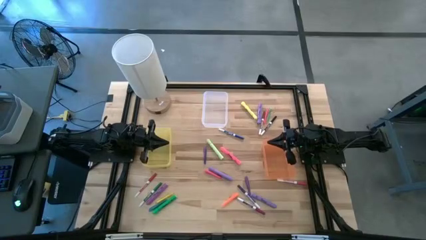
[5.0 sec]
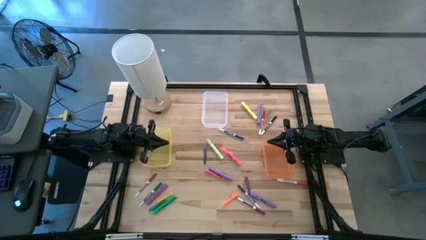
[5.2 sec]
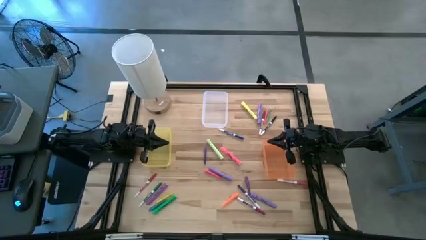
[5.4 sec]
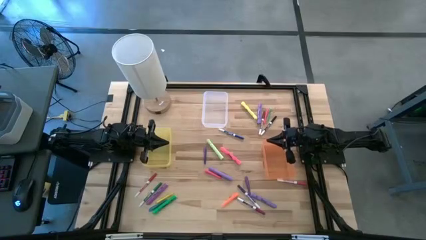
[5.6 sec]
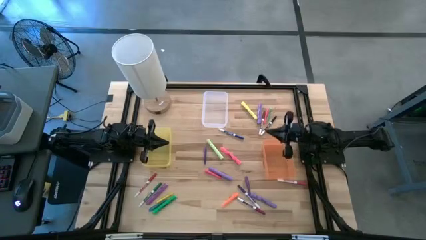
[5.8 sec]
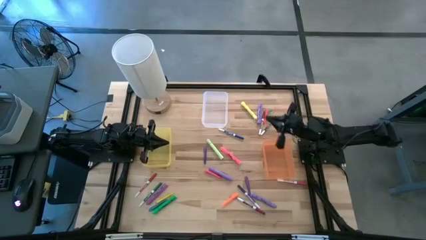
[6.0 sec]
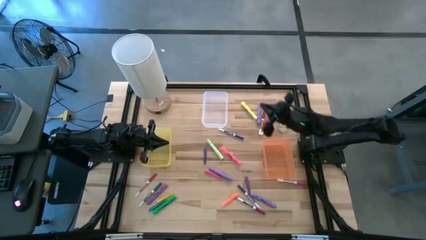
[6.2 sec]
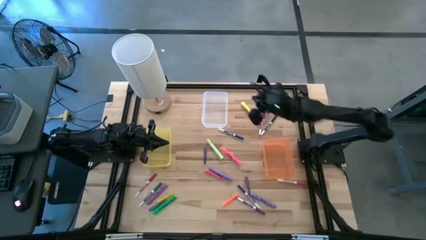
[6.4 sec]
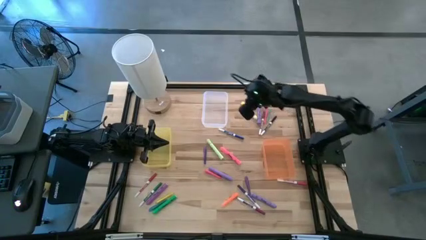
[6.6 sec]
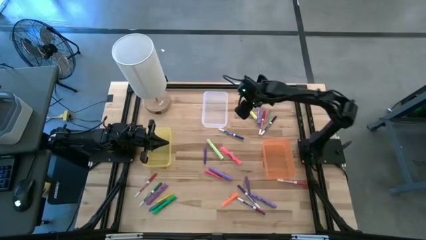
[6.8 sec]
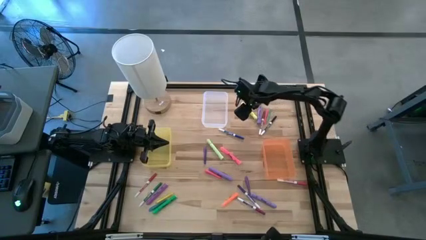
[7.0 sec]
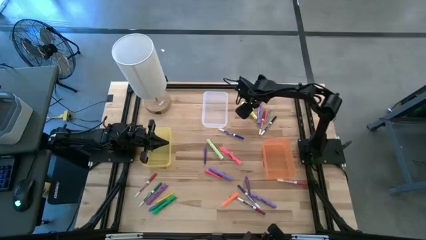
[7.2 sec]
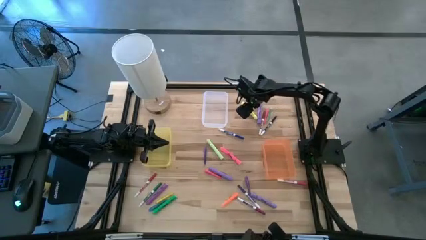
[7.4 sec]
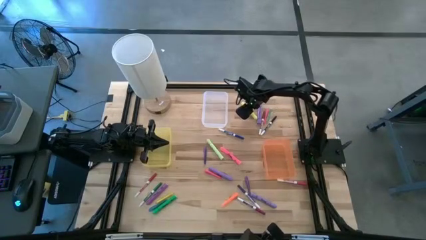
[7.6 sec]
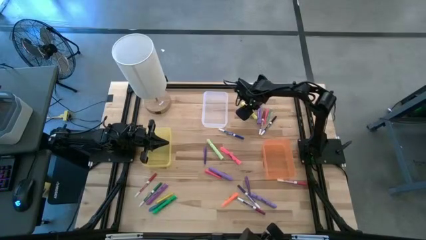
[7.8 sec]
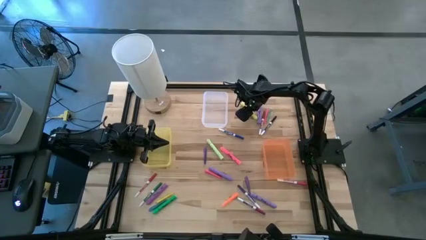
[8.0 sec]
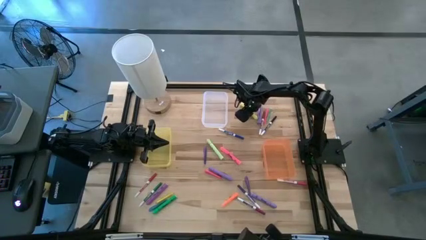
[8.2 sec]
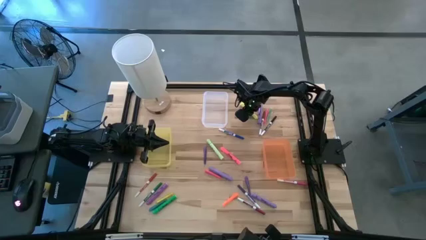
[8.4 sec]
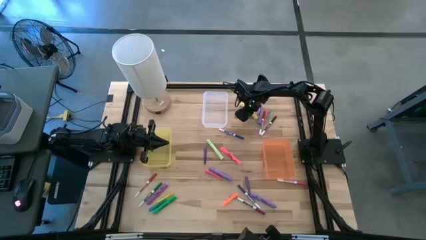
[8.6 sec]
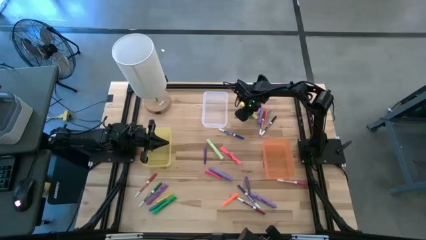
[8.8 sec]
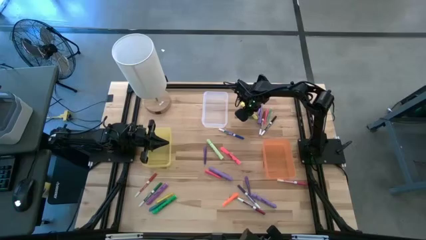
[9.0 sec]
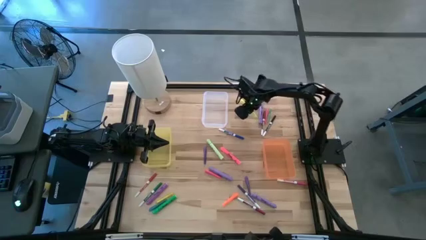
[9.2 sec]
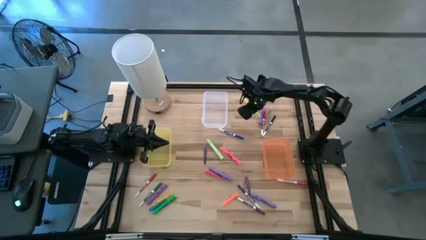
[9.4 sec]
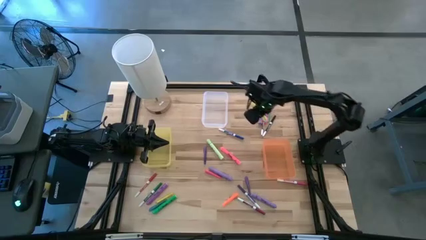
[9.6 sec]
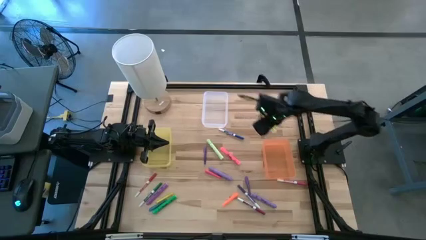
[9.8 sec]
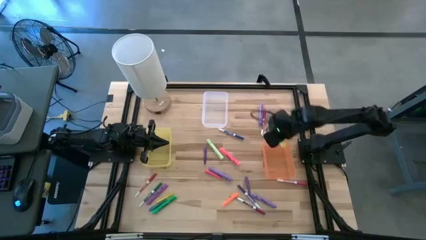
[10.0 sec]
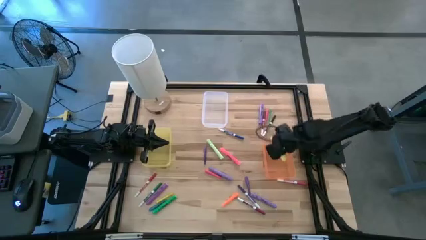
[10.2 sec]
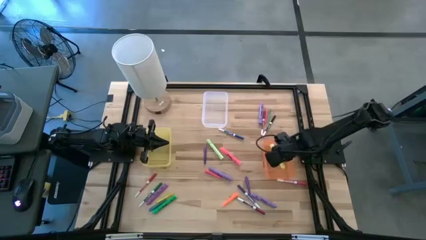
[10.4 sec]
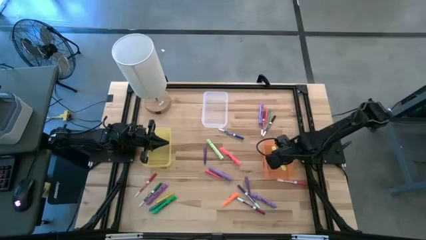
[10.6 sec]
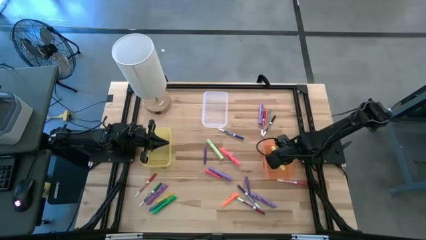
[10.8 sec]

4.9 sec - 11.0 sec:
Task: Pick & Place Markers
Put the yellow highlighter pen into the orange bin

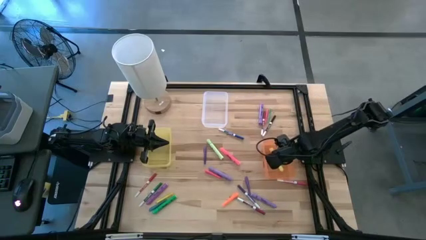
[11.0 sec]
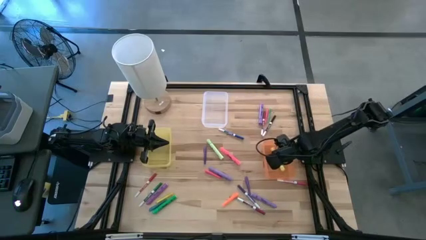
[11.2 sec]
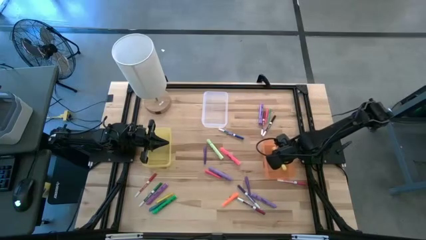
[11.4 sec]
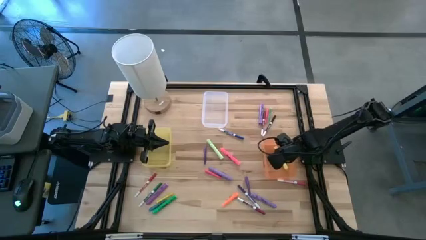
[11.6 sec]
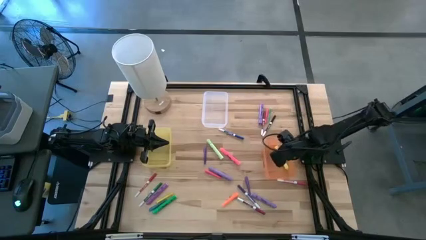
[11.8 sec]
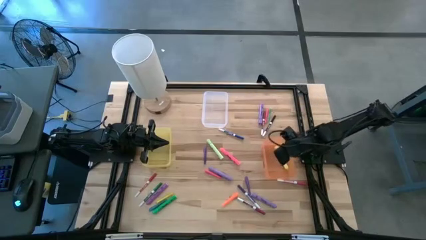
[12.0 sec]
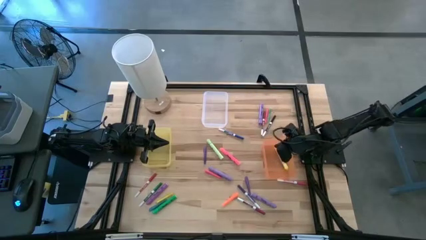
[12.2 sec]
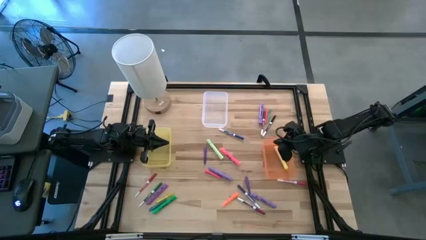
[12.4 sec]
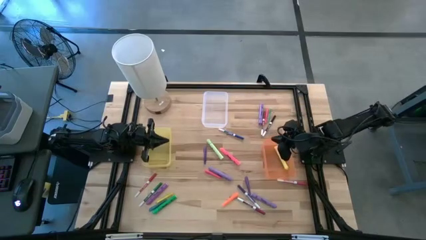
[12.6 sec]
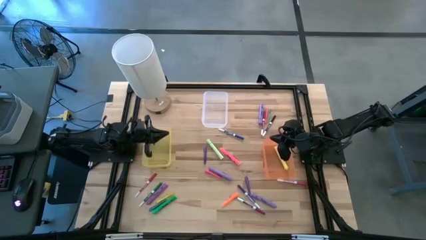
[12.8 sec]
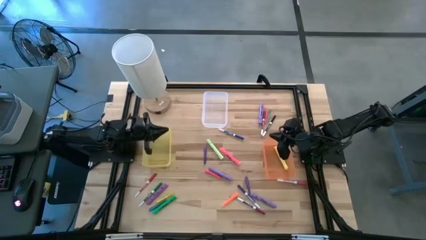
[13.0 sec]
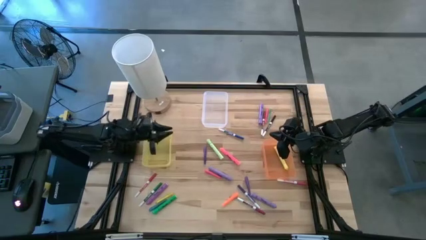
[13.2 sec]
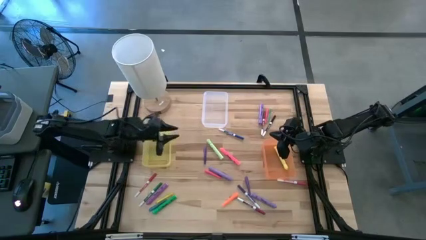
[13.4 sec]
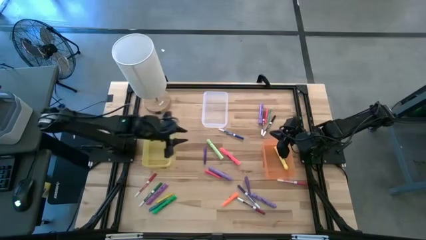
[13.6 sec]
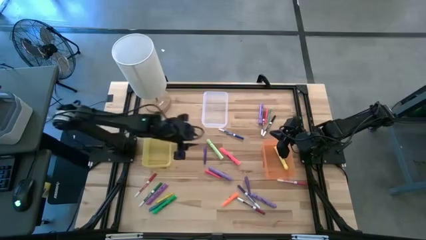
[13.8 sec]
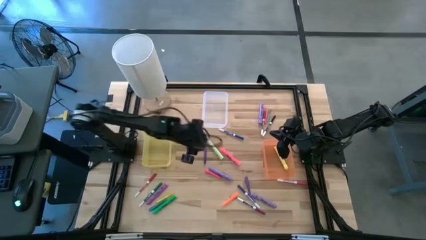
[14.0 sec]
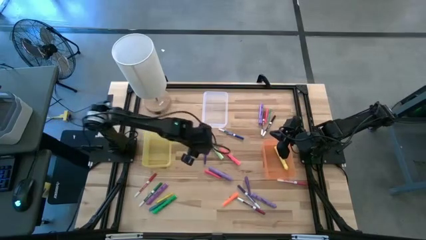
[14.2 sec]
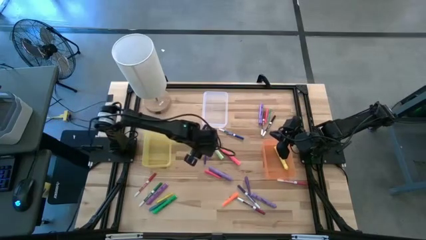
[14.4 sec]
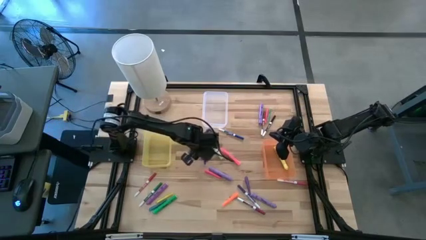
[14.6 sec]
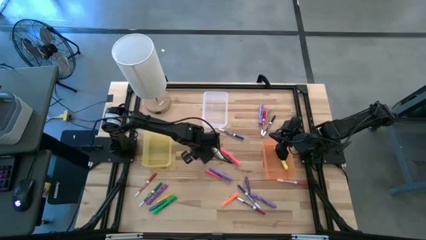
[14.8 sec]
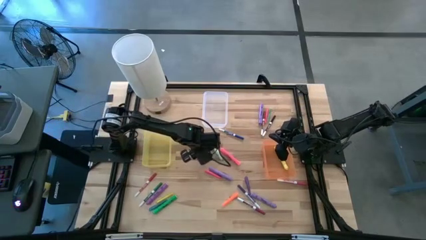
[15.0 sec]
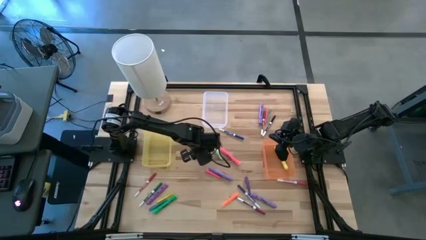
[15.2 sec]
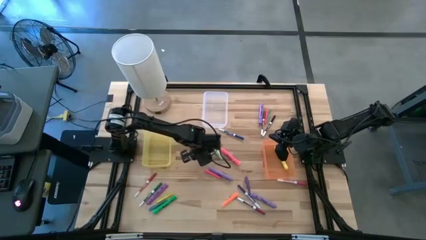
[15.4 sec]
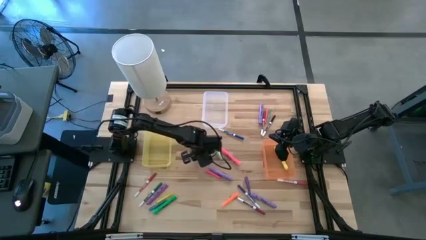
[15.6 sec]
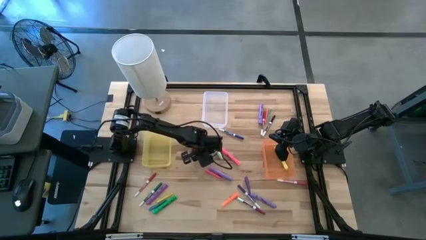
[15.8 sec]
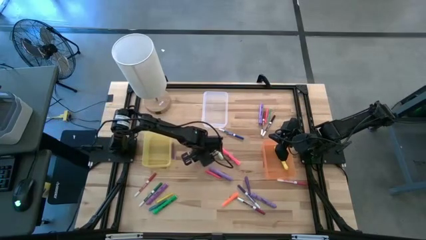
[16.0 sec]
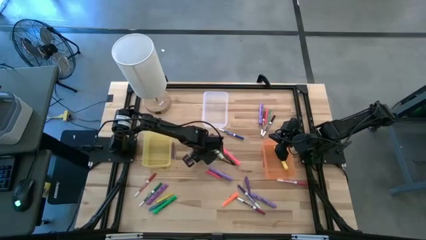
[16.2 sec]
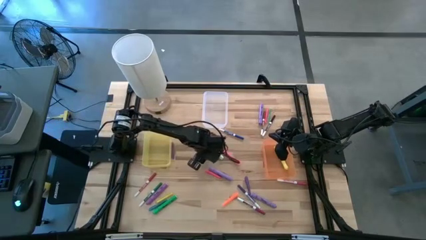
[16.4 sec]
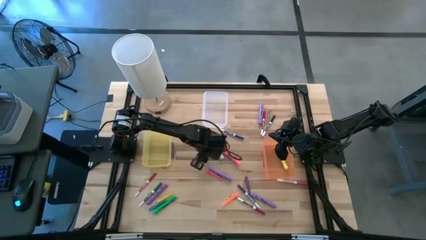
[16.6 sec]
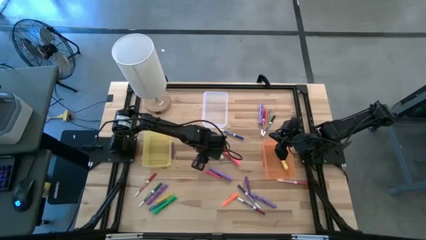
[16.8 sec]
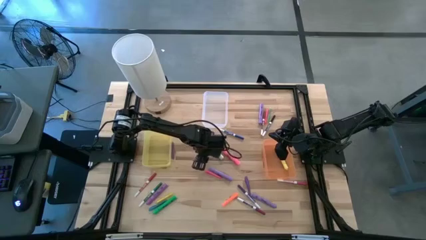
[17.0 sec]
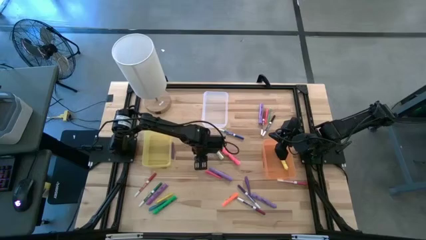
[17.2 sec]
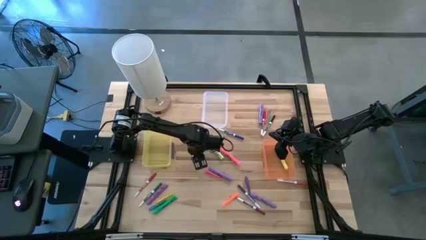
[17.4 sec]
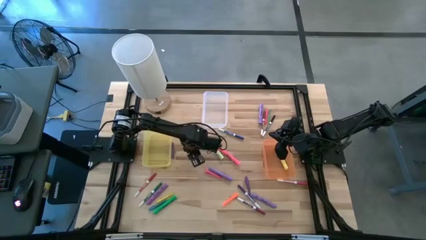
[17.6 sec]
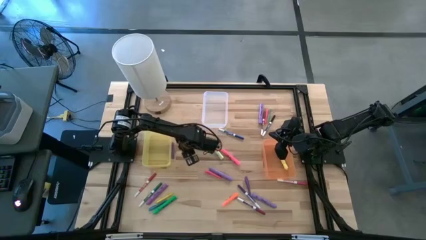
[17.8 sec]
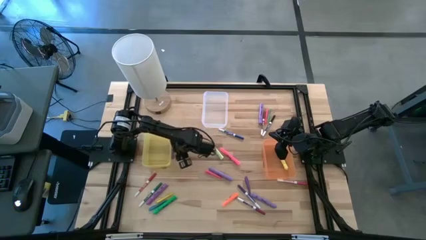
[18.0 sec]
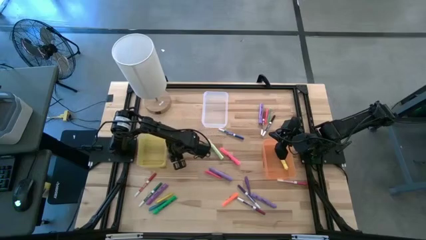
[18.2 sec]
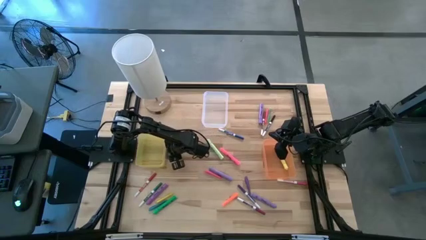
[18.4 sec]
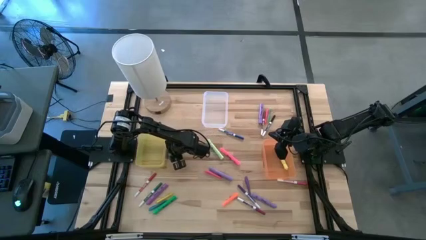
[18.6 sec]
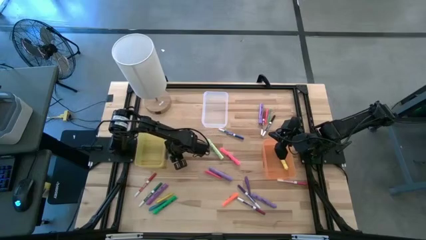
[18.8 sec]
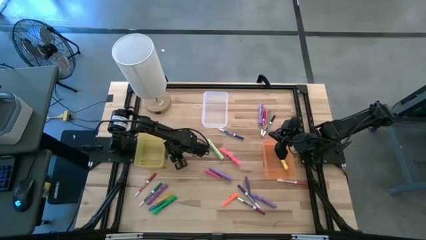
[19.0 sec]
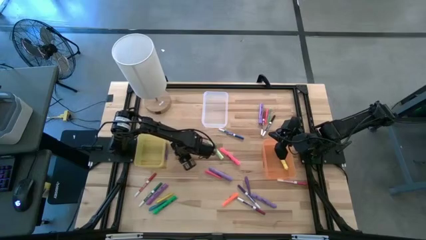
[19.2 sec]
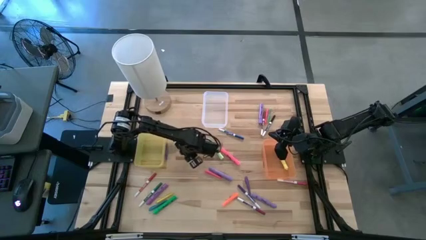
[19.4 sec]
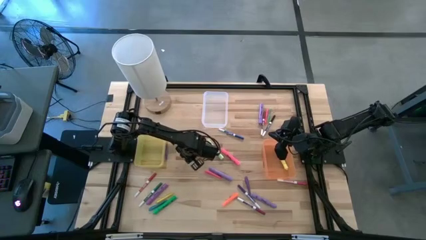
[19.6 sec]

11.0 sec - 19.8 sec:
Put the purple pen into the yellow bin

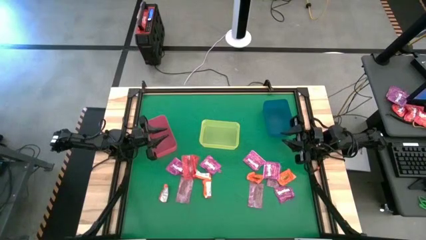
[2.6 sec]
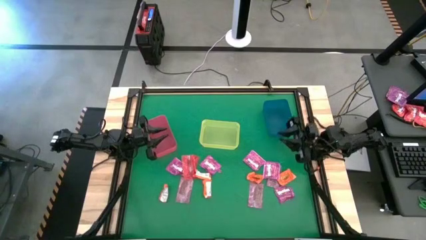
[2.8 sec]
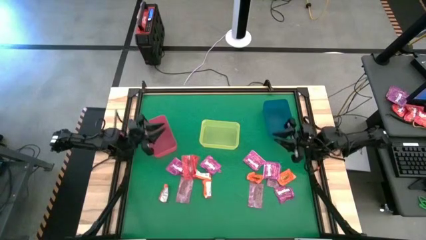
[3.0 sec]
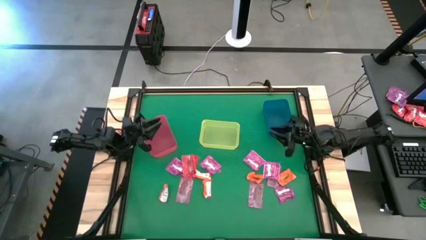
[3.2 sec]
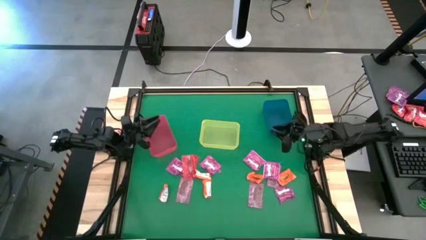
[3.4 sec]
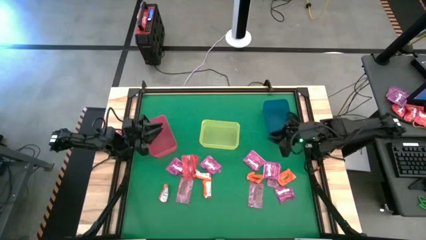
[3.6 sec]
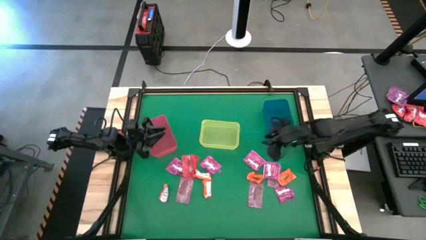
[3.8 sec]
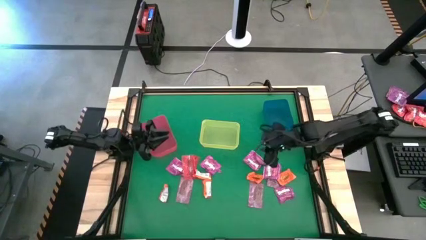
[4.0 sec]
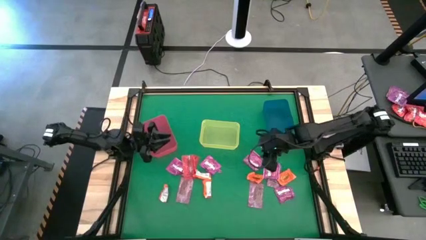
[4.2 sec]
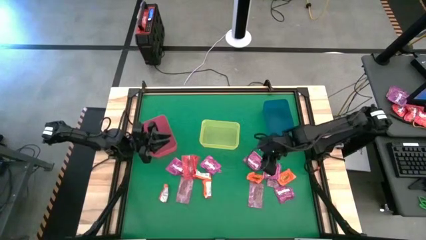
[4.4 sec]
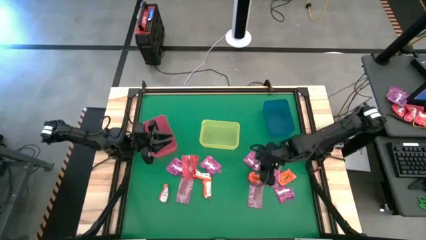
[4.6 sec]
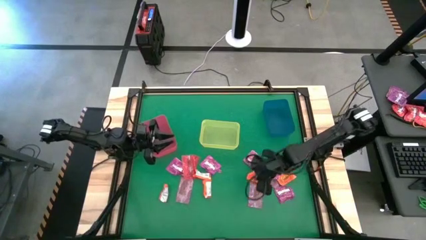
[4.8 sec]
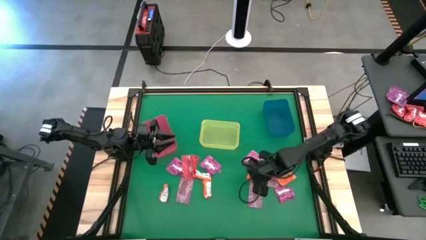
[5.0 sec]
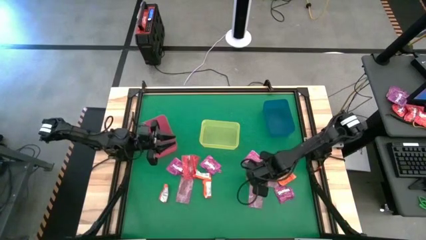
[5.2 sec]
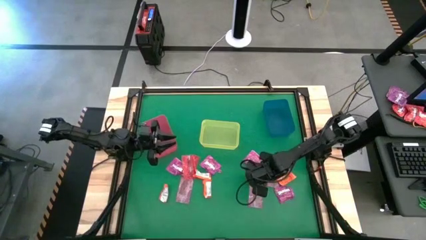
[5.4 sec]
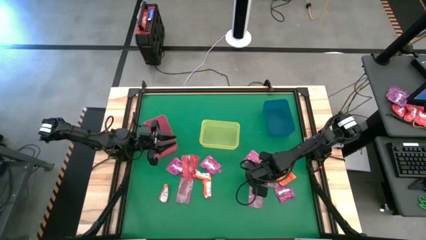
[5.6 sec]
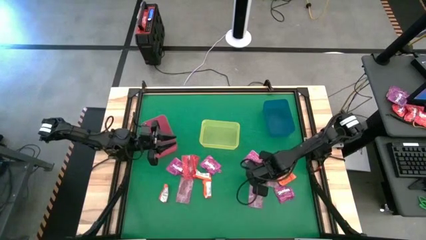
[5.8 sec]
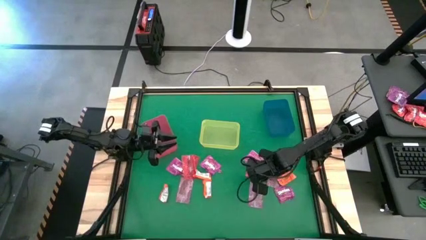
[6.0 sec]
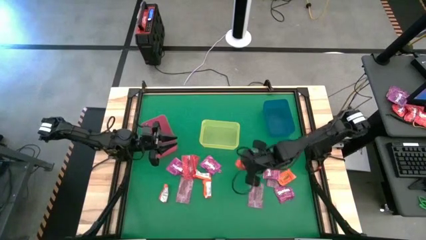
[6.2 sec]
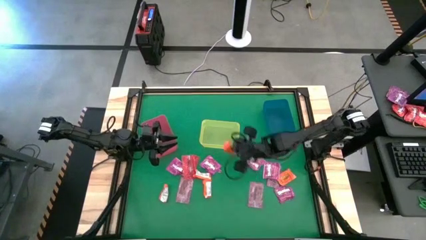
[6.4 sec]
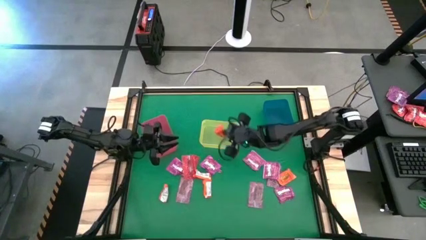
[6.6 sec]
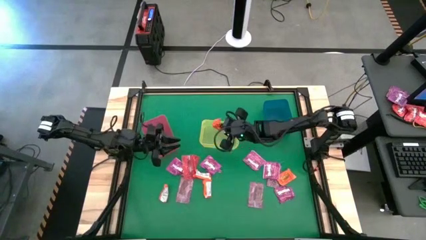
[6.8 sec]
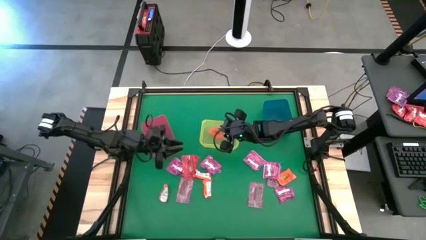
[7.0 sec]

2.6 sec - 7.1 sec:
Task: Sort candy by brand, put in halloween buckets
Put the orange chocolate into the yellow bin
